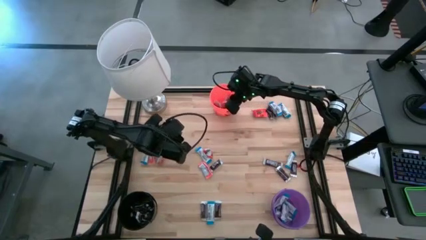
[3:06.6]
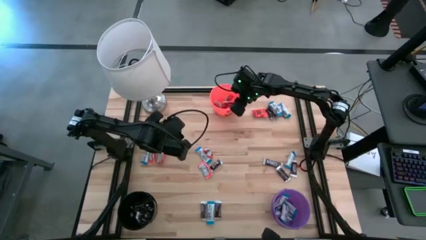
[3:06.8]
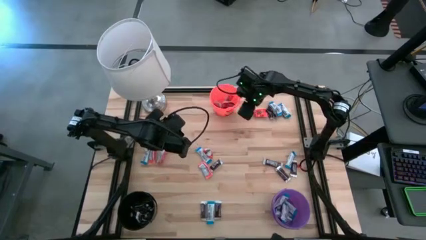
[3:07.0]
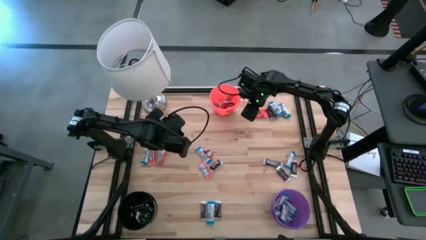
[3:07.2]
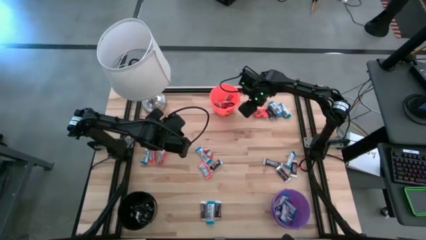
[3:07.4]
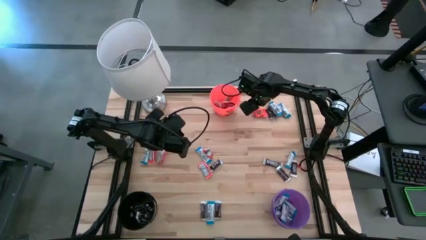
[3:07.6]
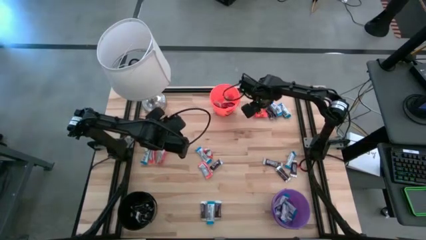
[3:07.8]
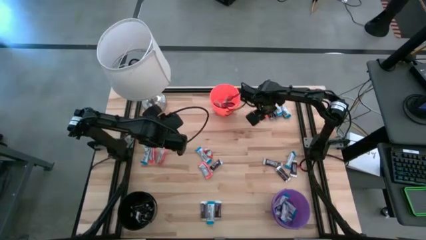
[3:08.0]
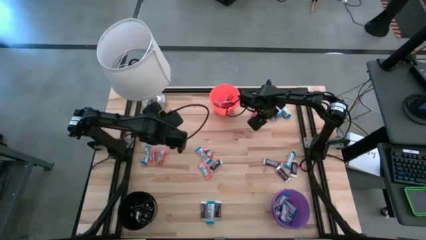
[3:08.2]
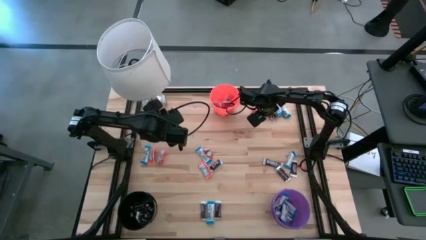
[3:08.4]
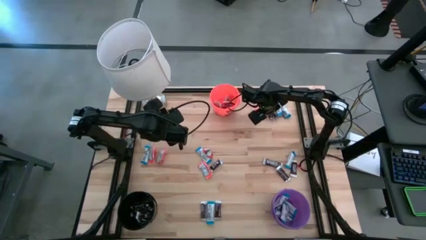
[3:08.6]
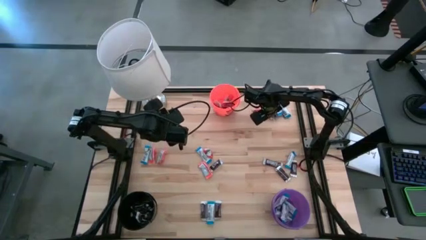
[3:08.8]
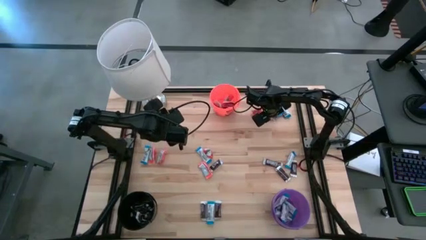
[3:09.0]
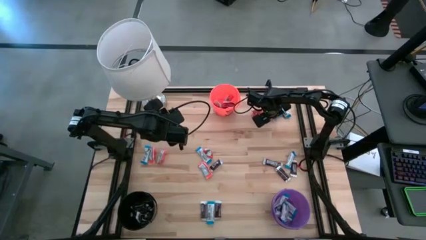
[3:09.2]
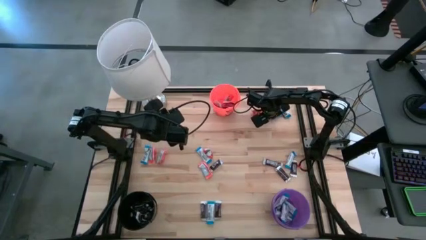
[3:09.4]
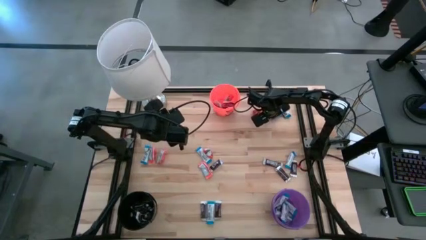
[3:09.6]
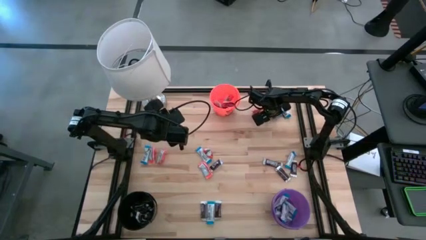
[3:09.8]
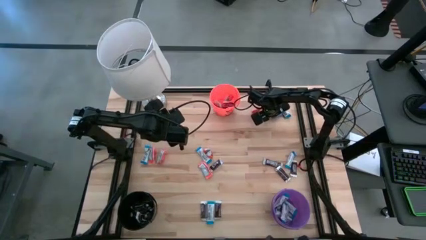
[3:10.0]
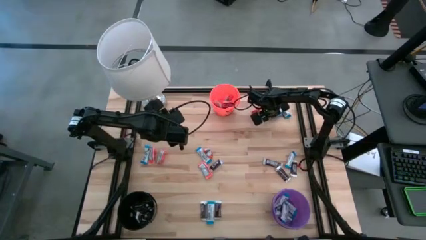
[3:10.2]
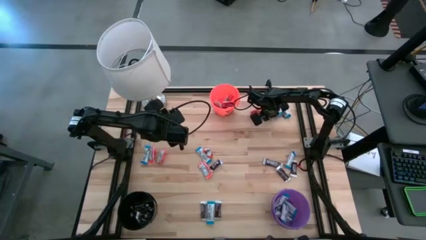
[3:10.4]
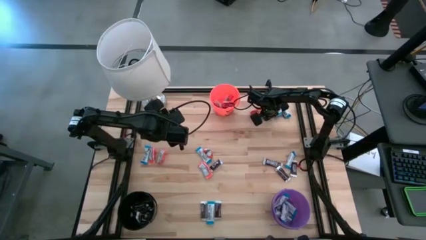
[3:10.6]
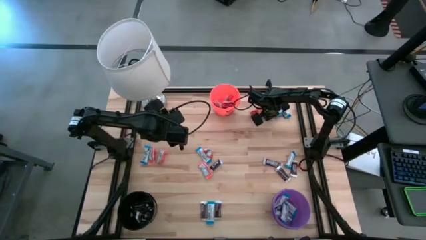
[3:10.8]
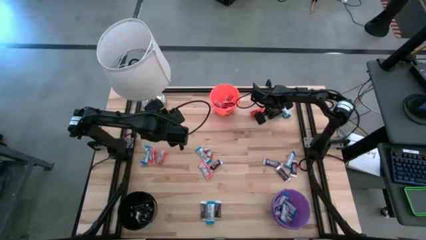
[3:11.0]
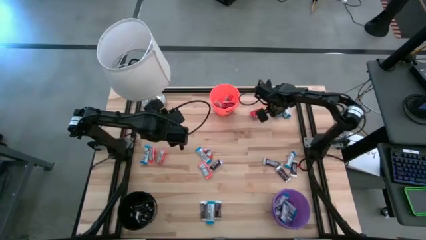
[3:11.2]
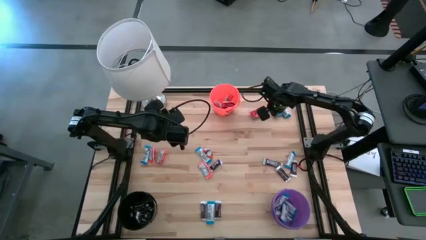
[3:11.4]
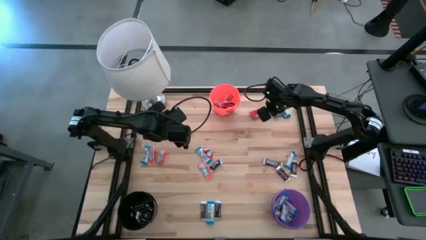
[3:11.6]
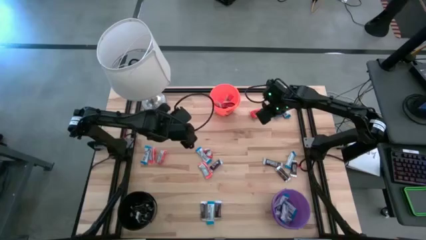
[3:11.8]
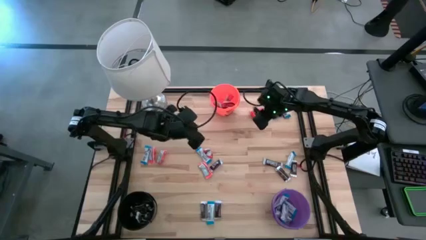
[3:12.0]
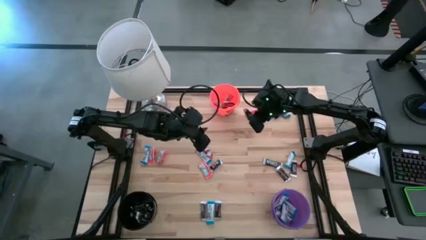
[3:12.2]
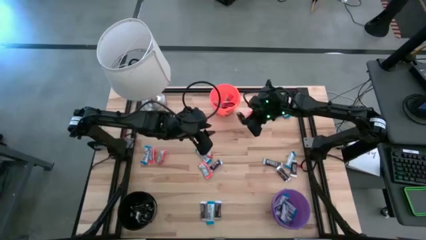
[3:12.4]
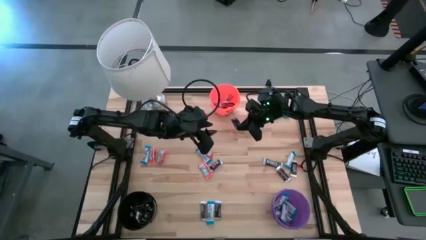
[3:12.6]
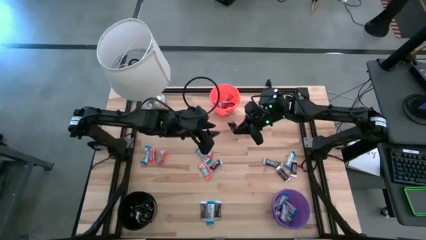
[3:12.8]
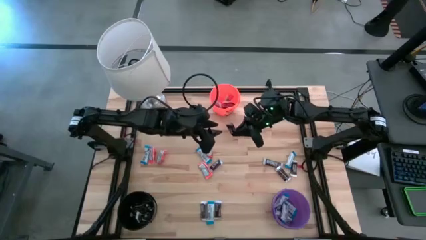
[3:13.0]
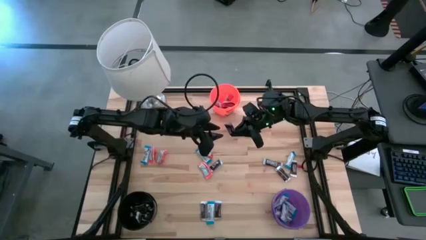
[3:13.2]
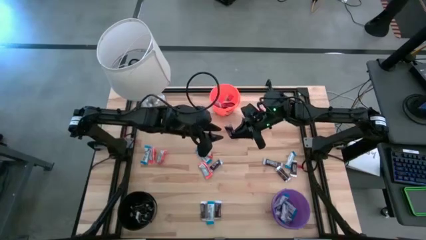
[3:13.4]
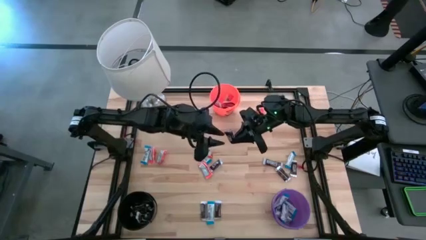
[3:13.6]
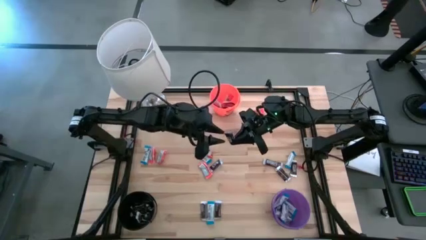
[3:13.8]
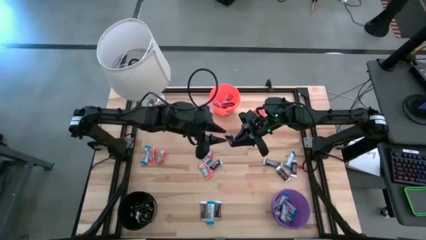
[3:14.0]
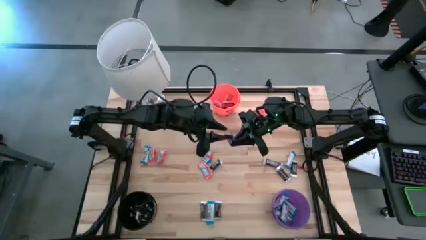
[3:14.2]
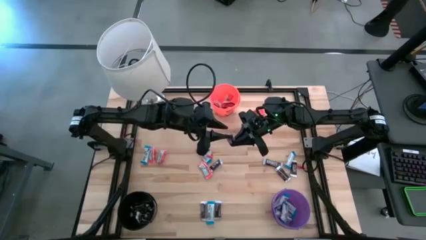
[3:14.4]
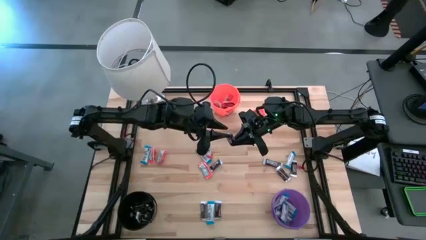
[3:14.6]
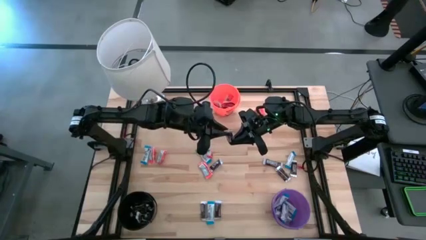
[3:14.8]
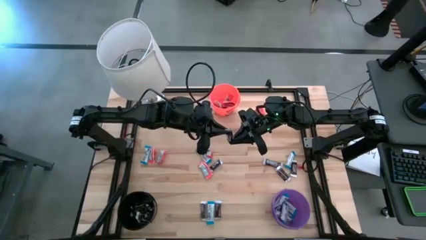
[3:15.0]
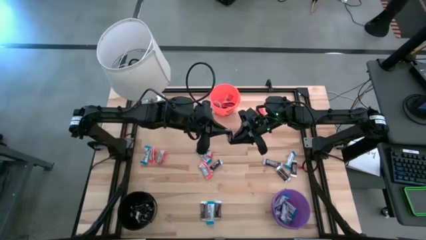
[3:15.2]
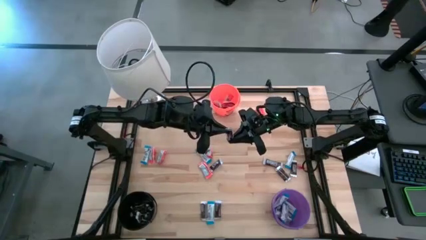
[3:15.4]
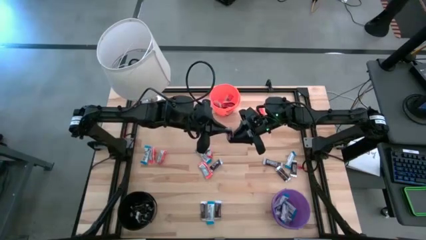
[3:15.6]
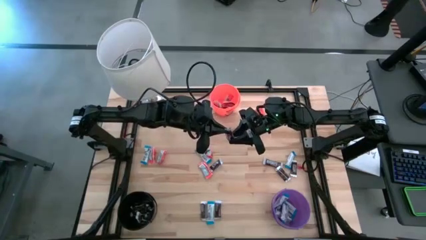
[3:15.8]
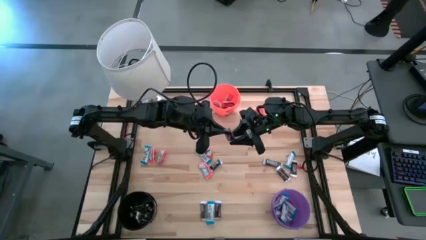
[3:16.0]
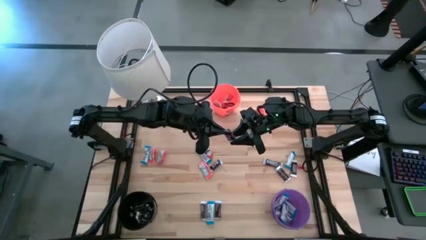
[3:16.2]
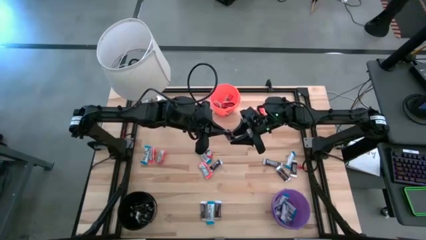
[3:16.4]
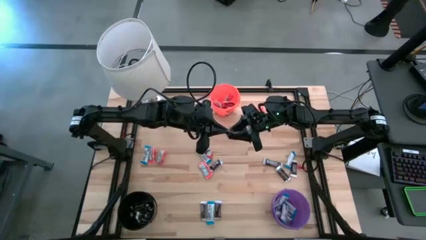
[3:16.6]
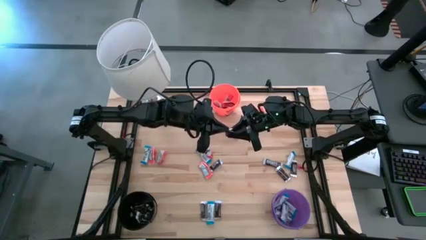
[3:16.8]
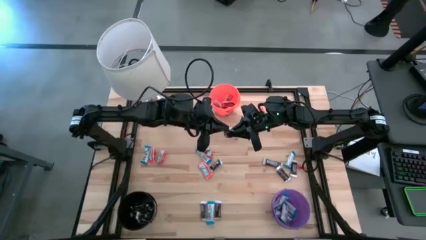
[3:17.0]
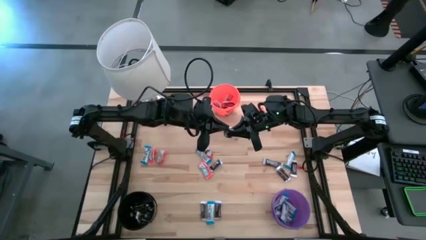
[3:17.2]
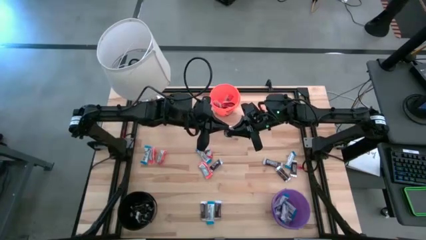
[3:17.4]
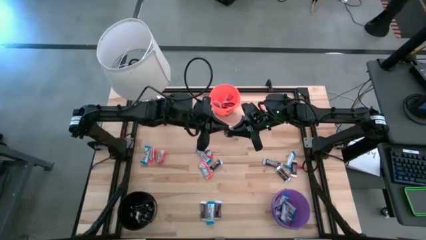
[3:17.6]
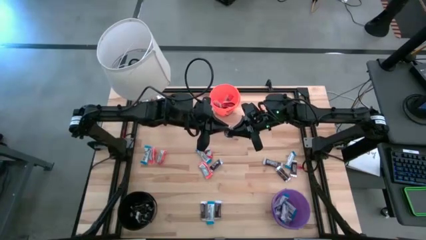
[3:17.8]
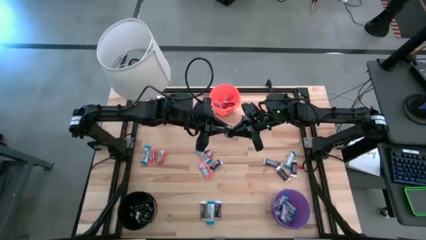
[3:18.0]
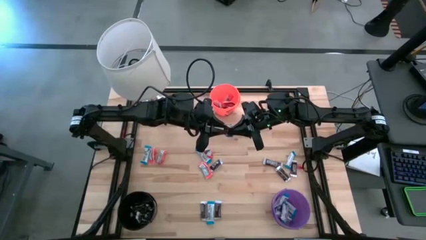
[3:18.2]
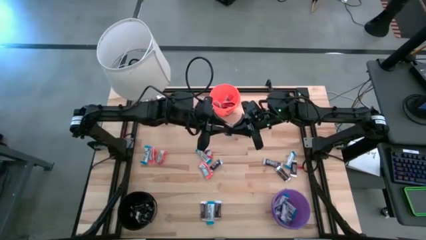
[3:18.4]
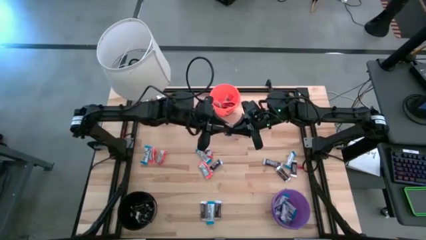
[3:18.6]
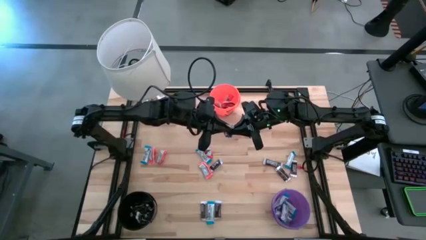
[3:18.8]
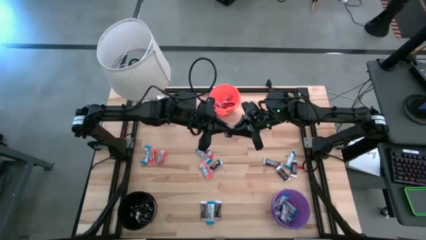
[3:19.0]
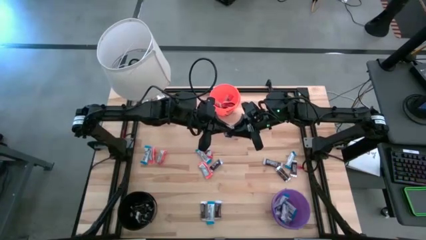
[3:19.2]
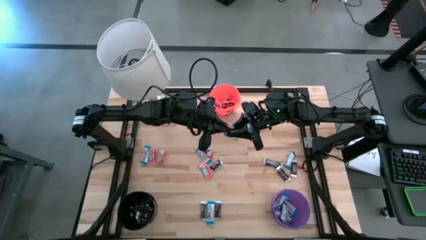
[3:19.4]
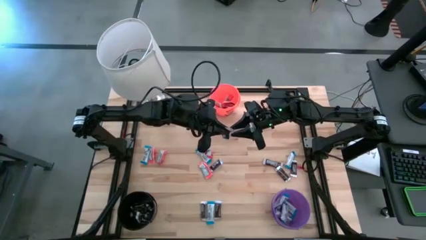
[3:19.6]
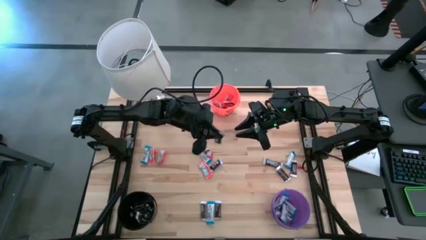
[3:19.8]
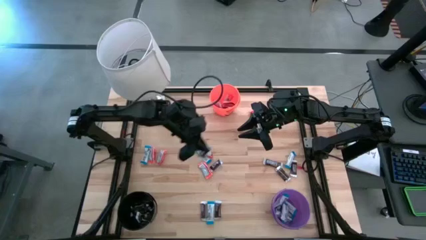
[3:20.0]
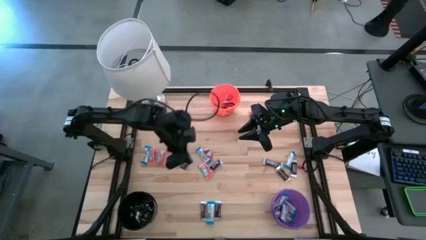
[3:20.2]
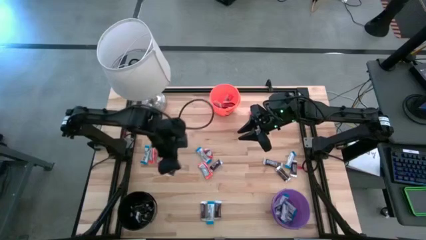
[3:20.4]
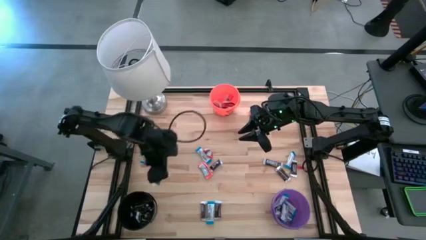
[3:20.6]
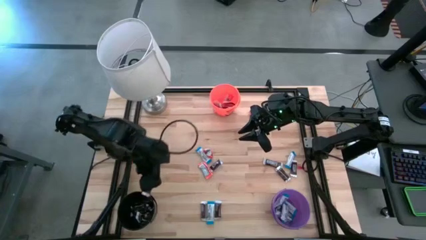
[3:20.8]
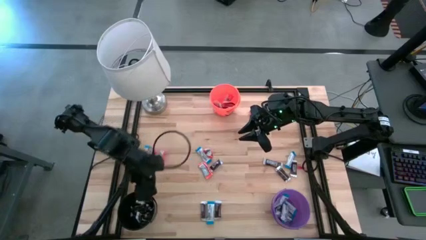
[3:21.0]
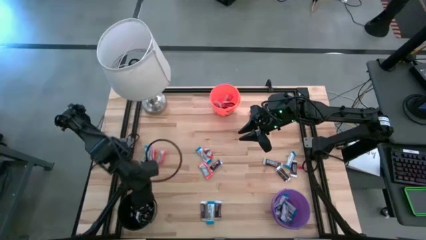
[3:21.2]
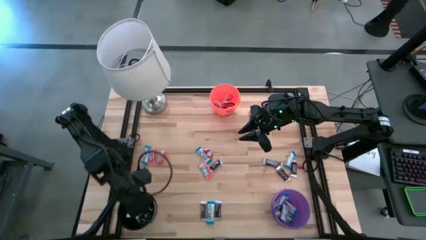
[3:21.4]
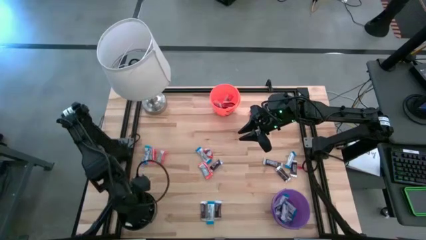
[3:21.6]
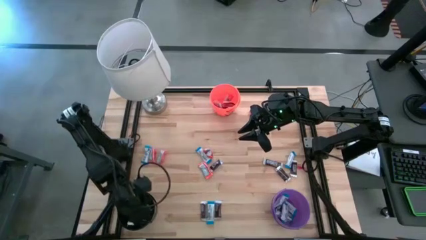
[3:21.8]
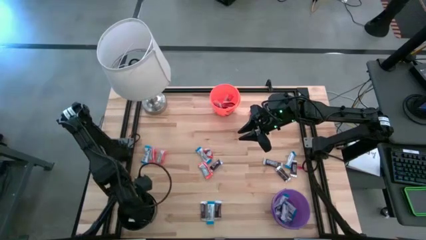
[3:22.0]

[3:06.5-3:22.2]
Task: Organize candy in baskets
Put the brown chocolate into the black bucket
